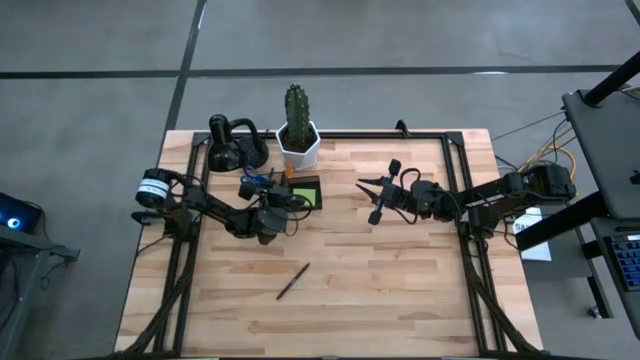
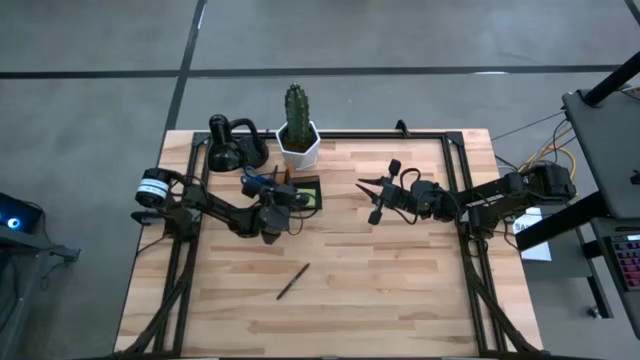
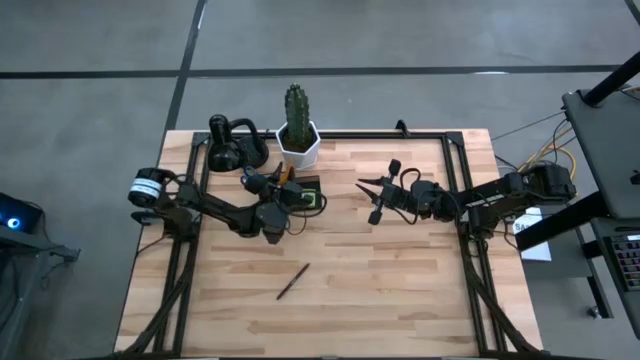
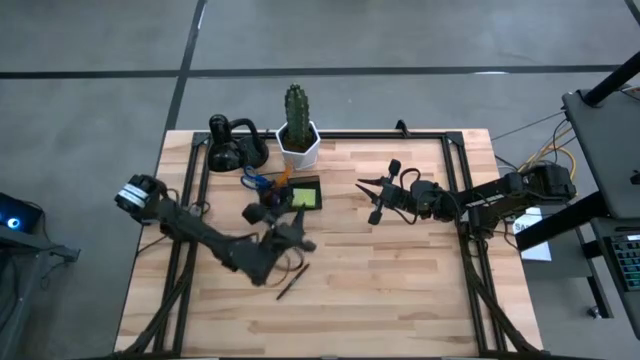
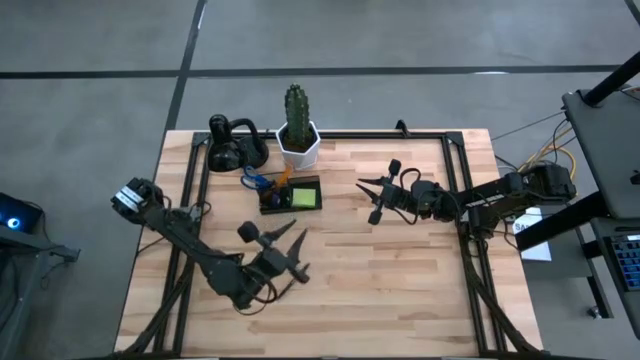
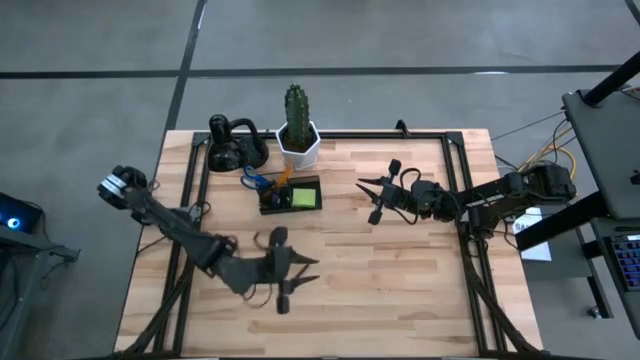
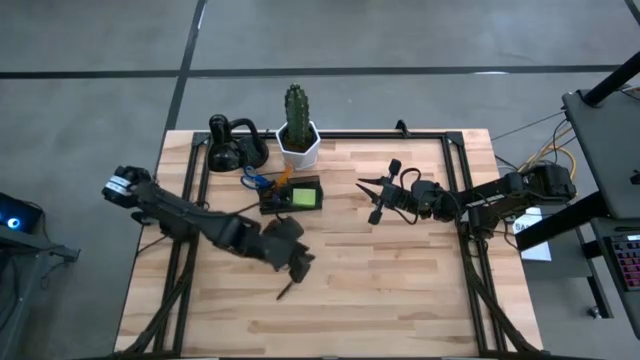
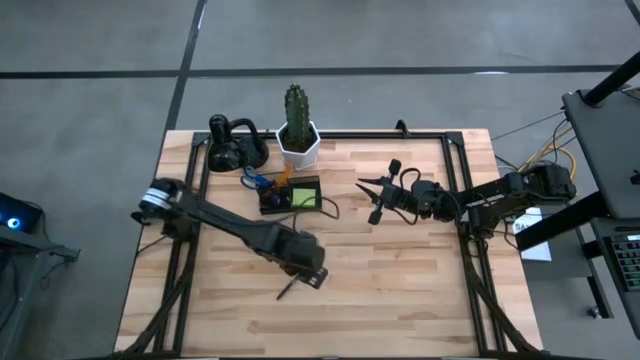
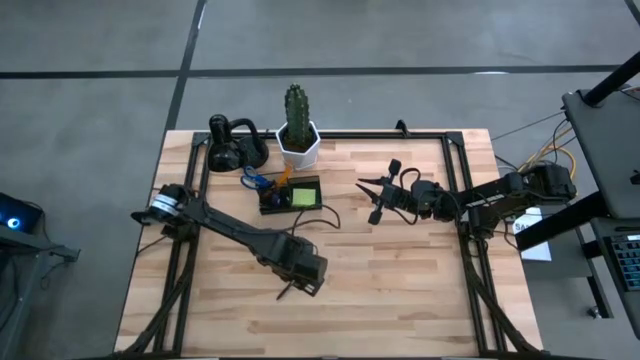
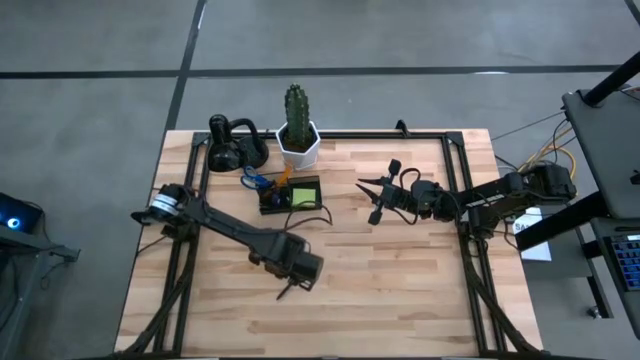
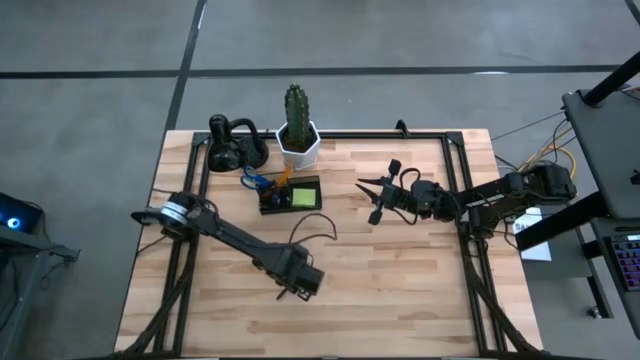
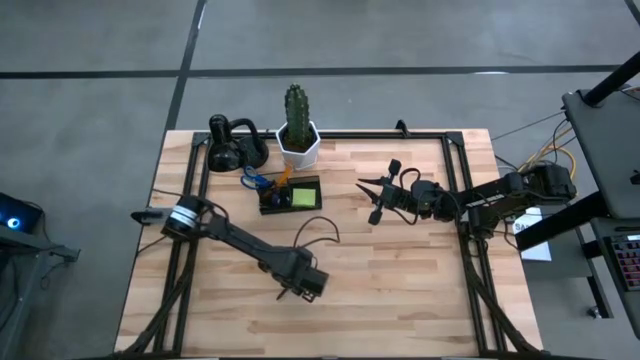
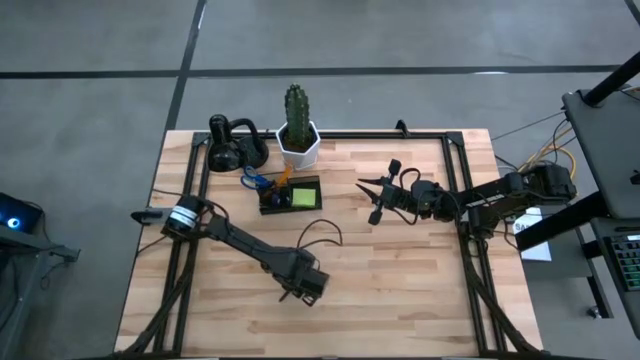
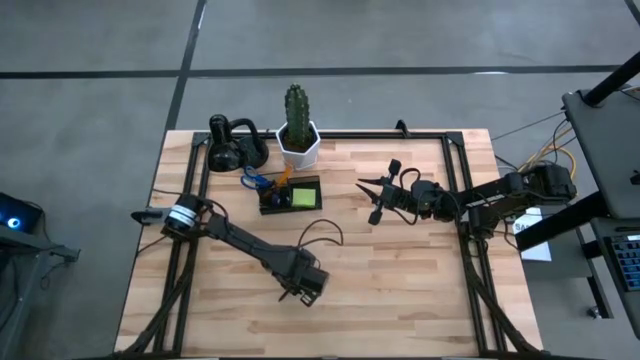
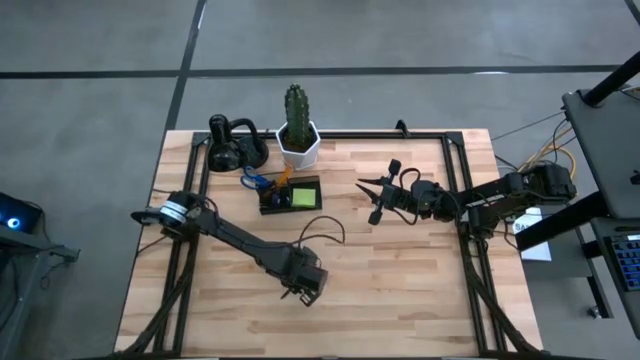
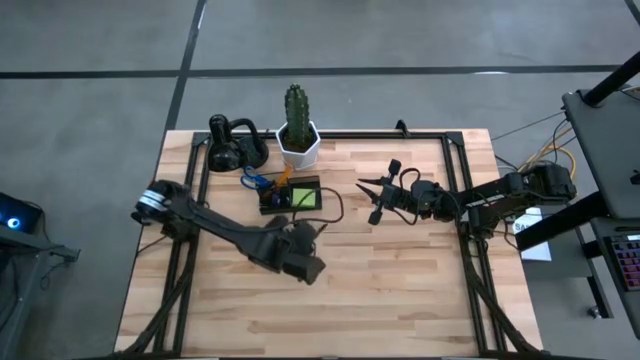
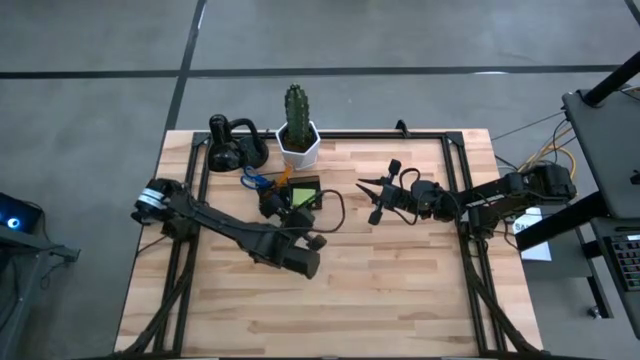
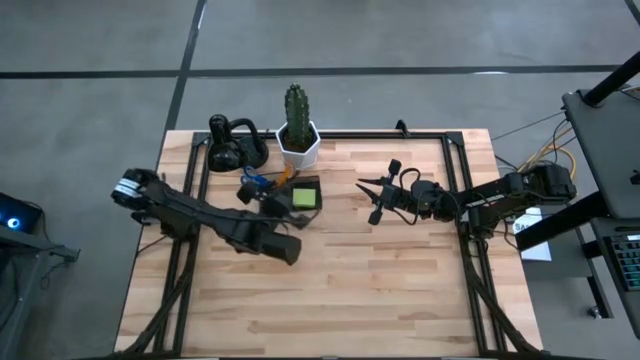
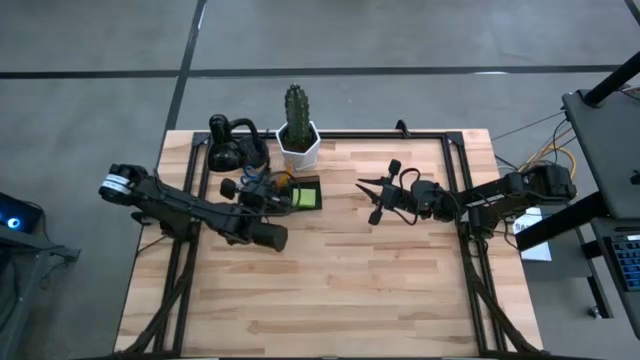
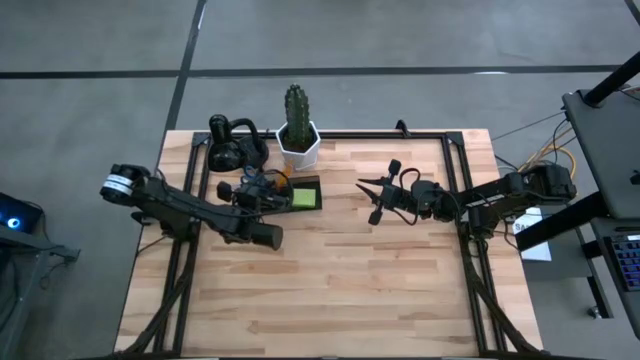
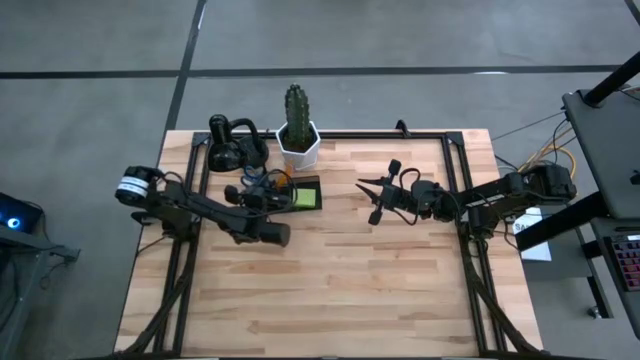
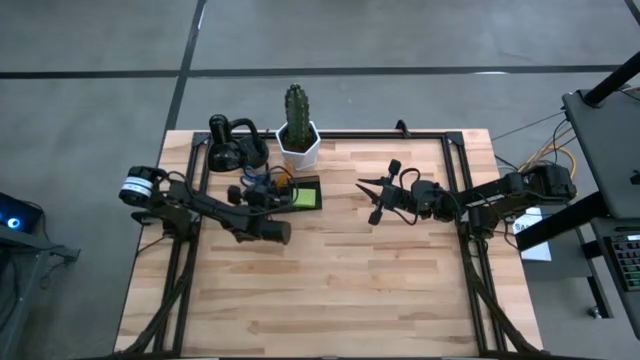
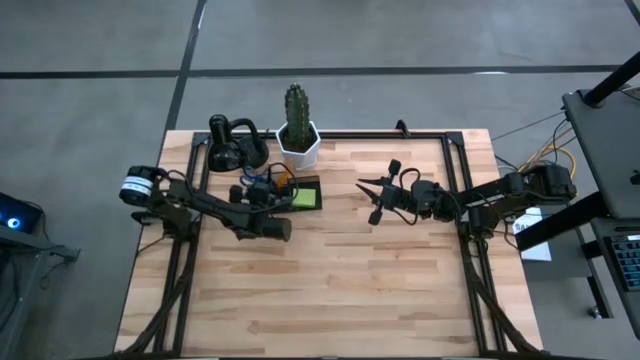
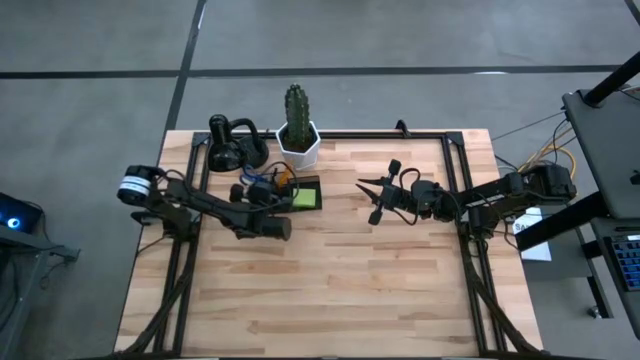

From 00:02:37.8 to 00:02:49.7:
Task: Pick and place office supplies into organizer
Put the black pen into the black desk organizer

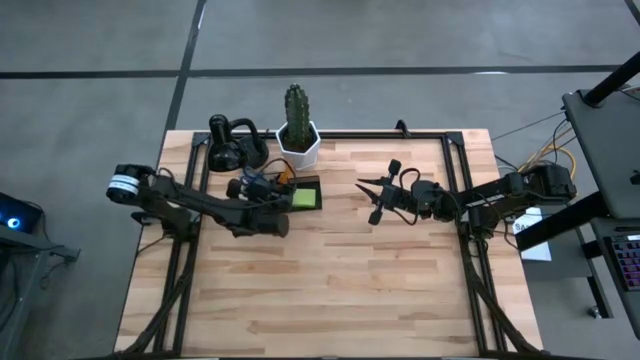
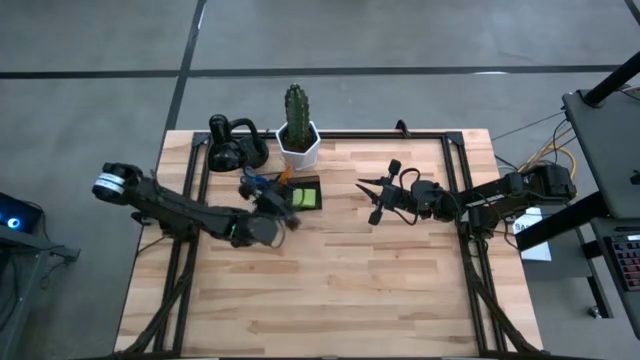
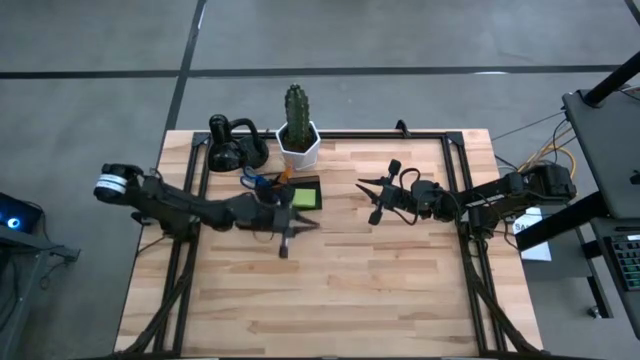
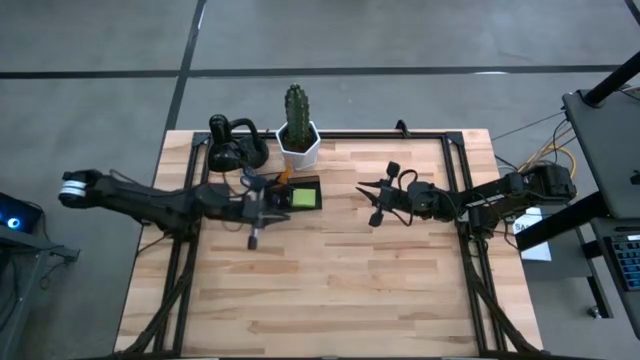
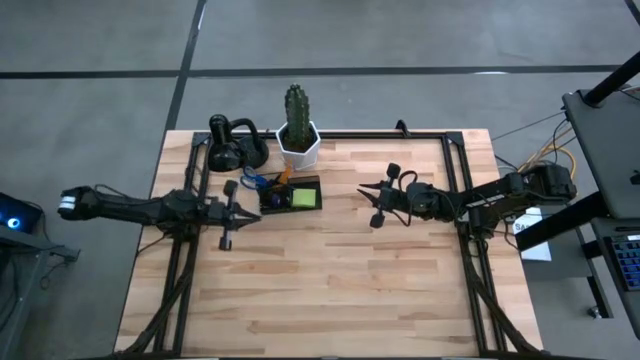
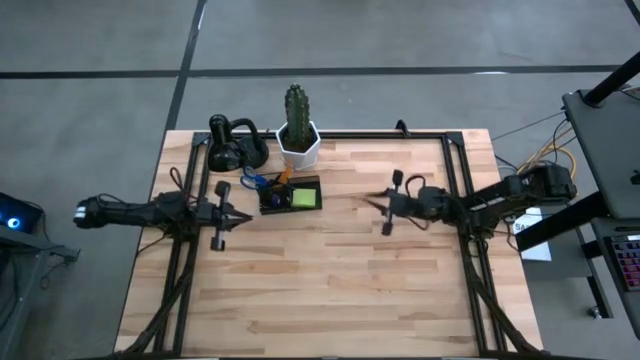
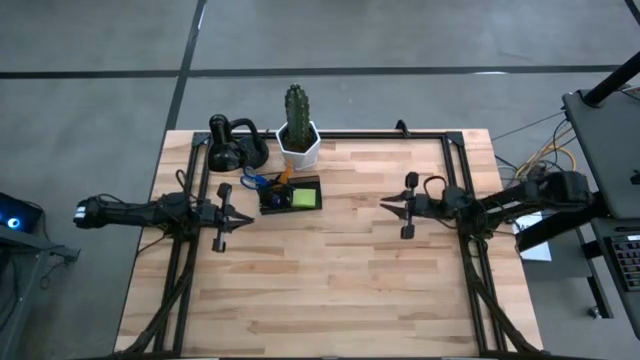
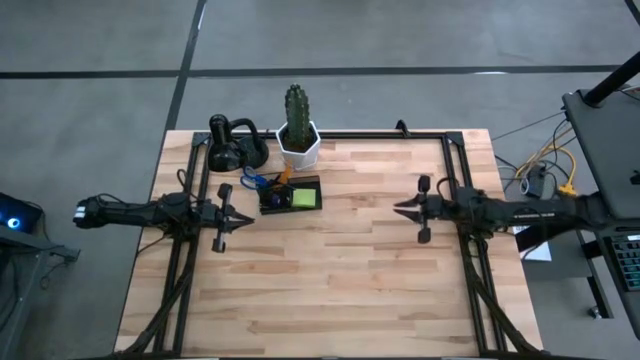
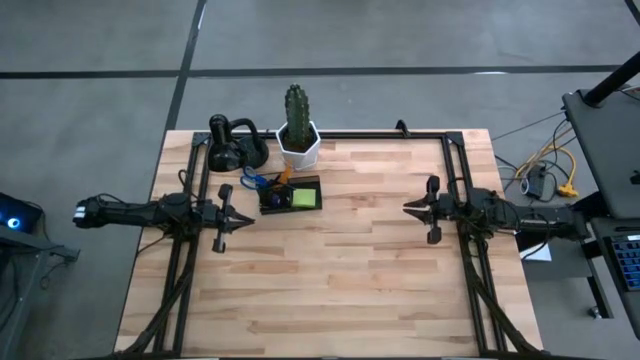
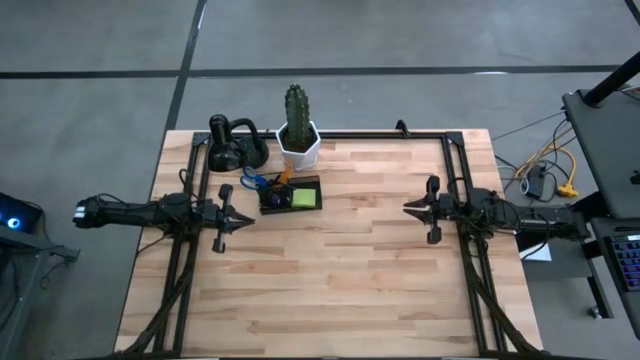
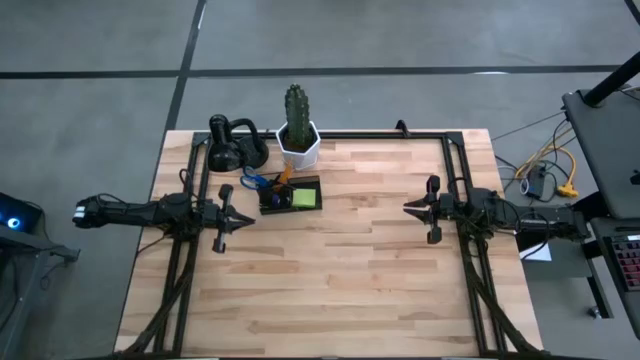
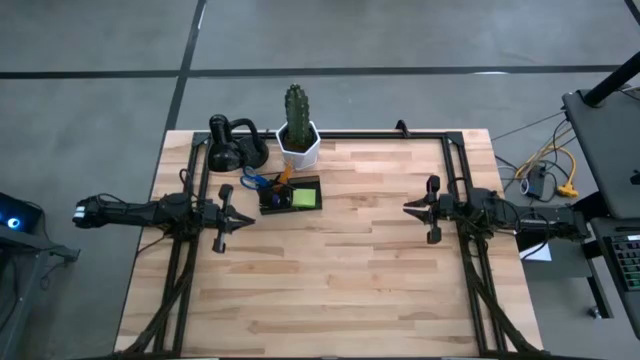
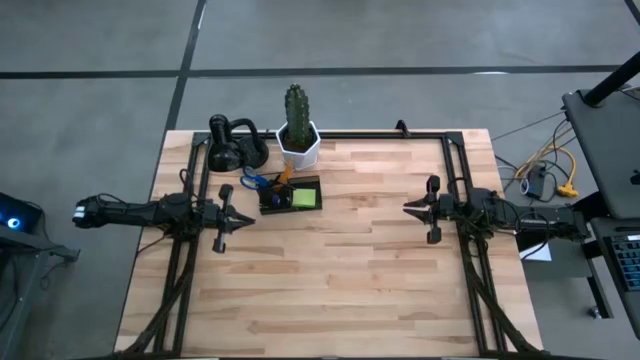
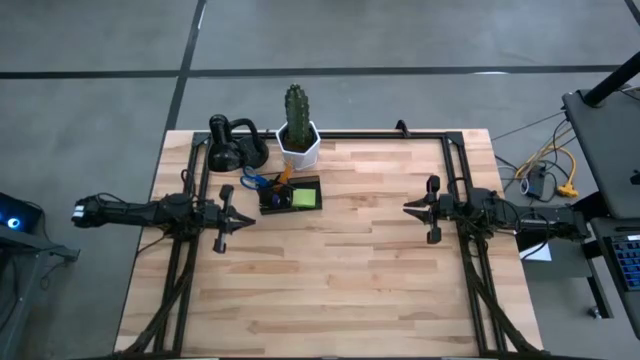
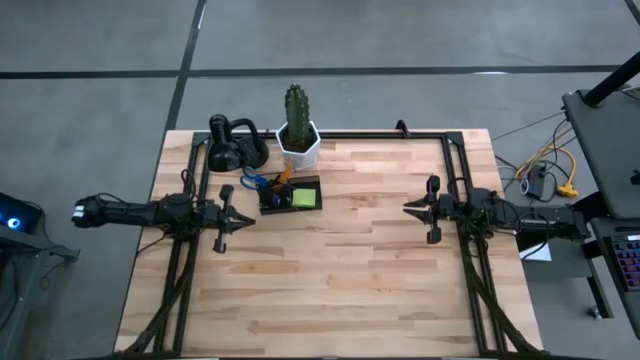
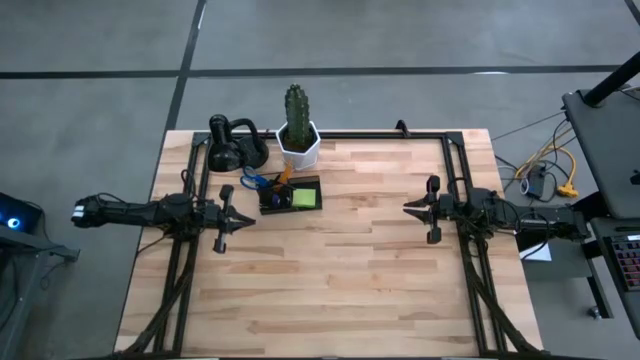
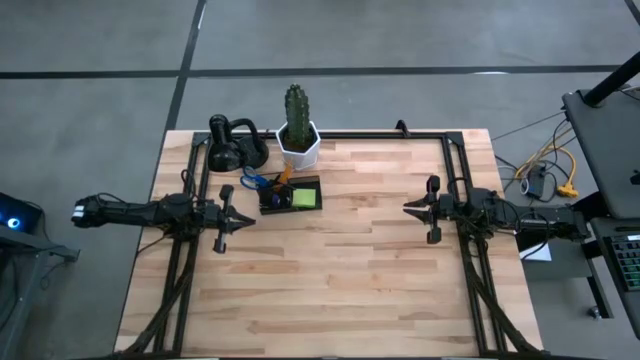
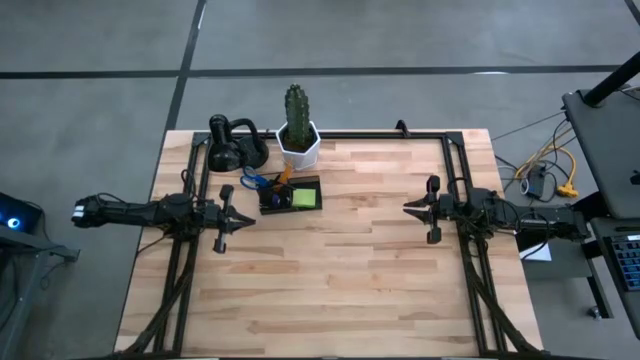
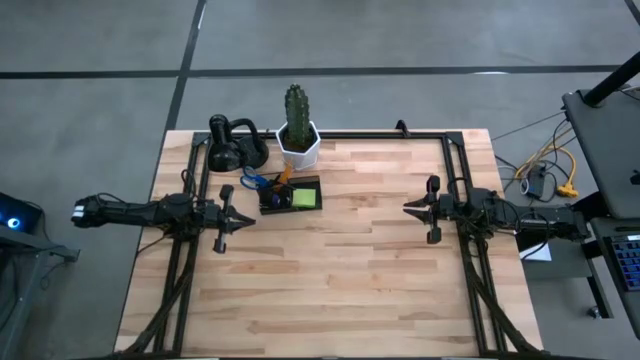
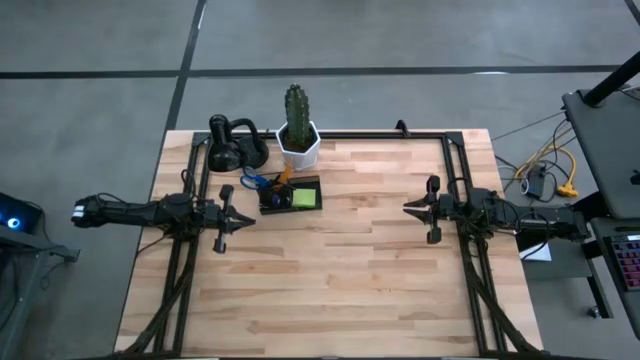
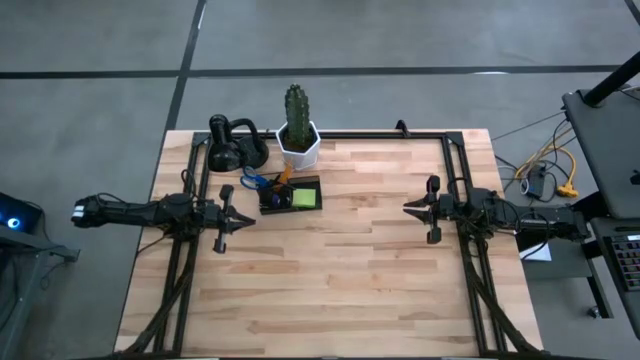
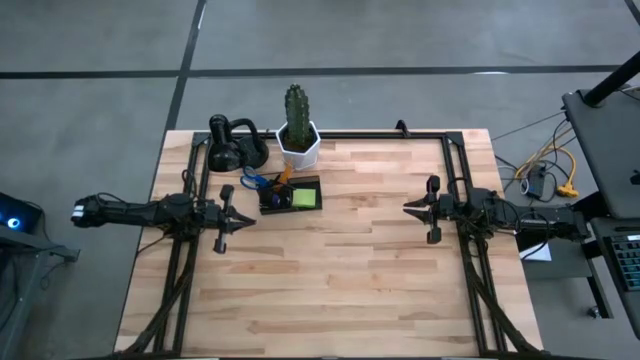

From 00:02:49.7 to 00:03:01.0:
Return to Home Position
